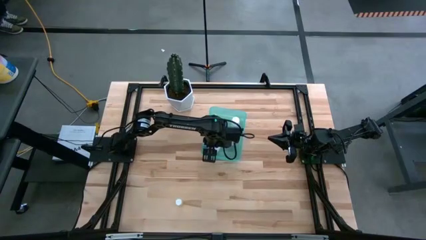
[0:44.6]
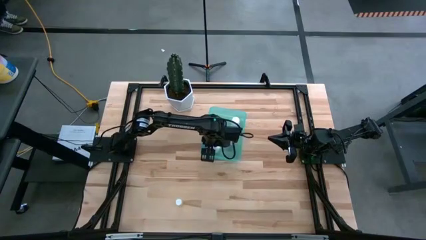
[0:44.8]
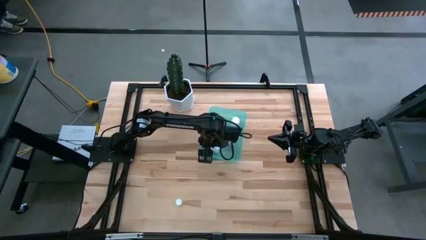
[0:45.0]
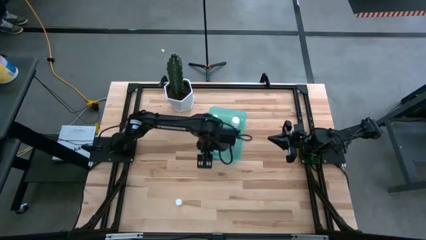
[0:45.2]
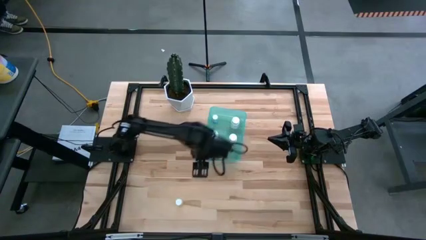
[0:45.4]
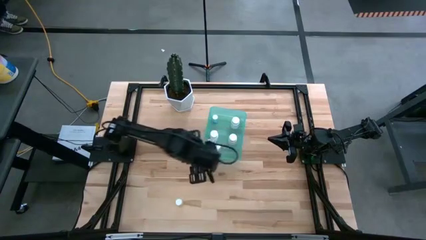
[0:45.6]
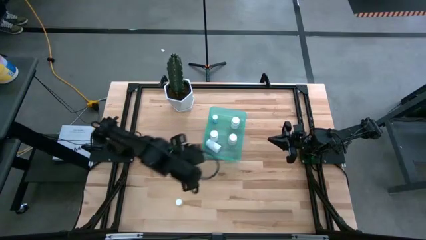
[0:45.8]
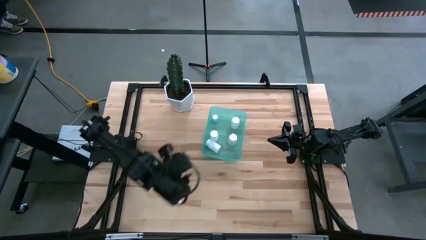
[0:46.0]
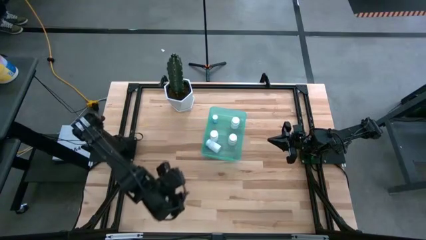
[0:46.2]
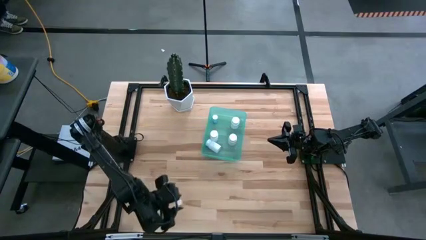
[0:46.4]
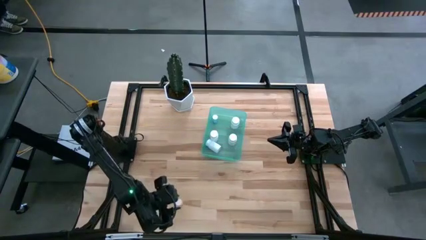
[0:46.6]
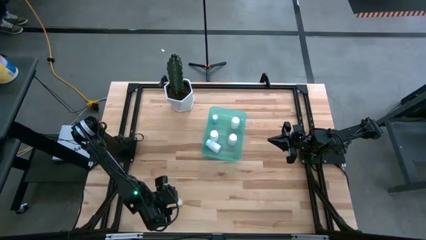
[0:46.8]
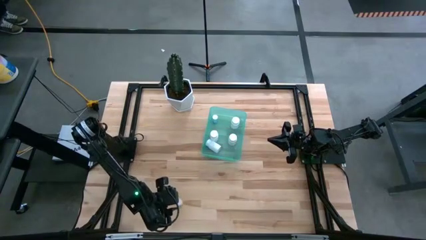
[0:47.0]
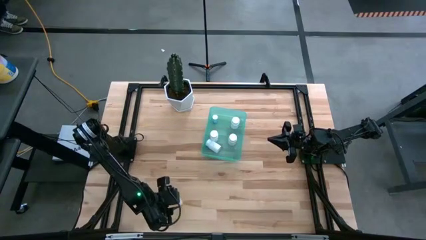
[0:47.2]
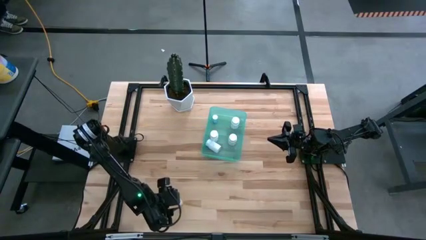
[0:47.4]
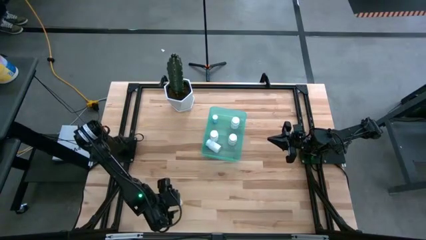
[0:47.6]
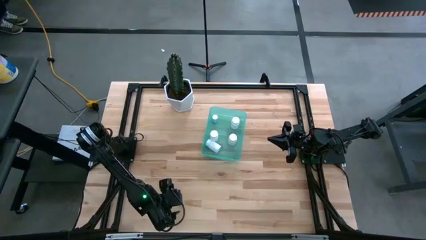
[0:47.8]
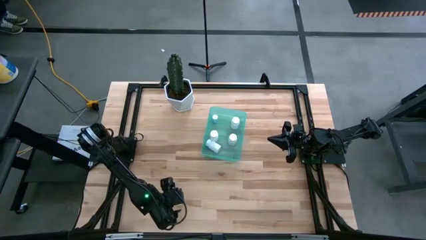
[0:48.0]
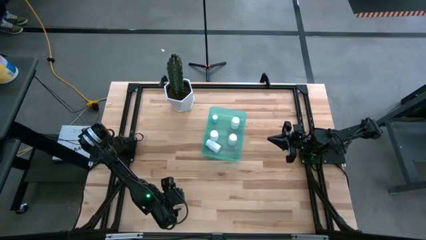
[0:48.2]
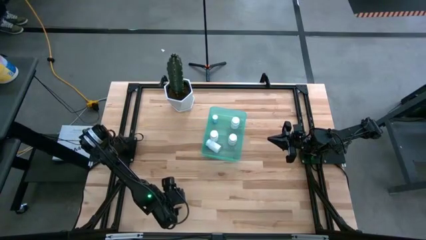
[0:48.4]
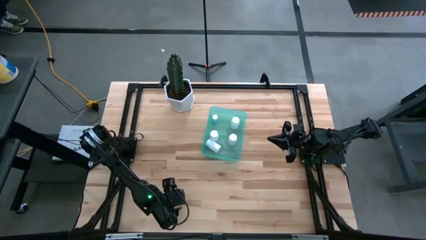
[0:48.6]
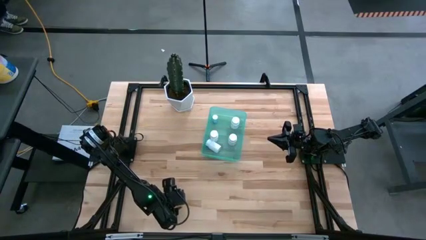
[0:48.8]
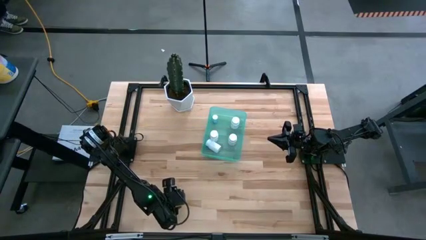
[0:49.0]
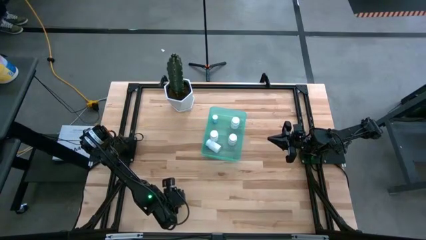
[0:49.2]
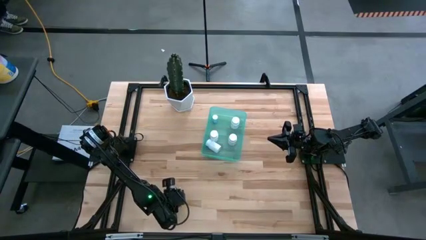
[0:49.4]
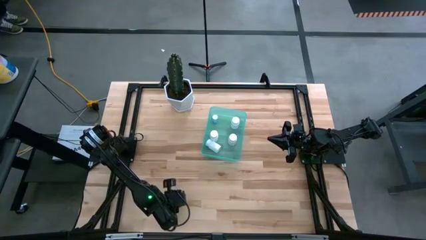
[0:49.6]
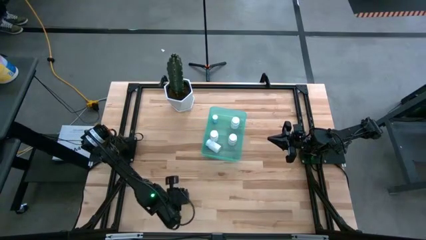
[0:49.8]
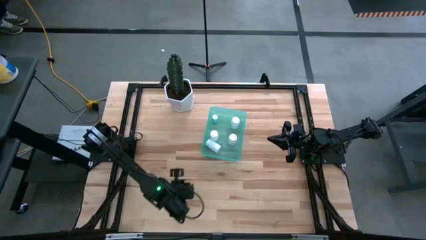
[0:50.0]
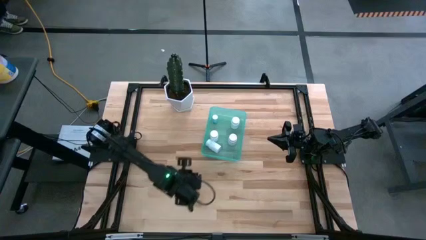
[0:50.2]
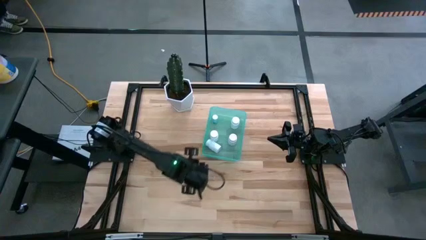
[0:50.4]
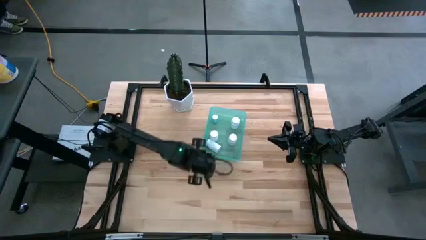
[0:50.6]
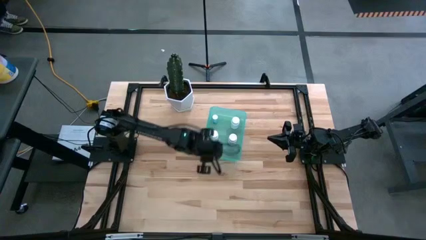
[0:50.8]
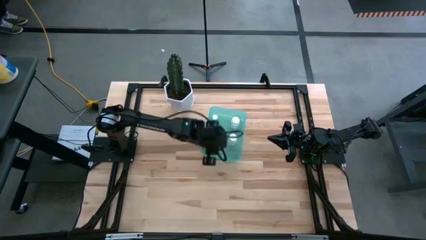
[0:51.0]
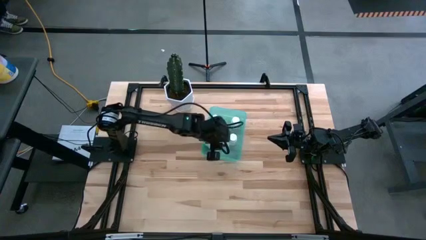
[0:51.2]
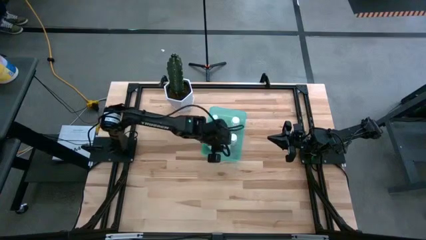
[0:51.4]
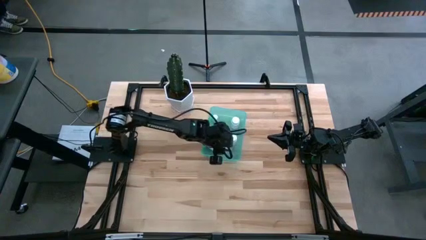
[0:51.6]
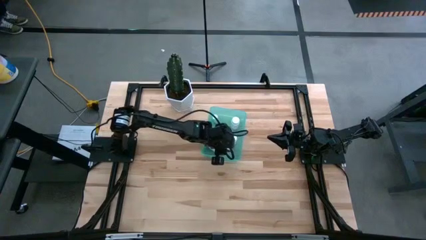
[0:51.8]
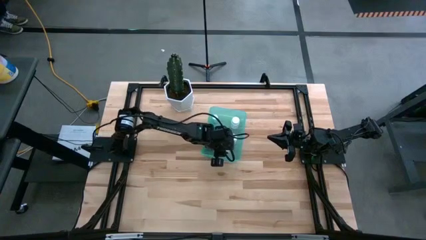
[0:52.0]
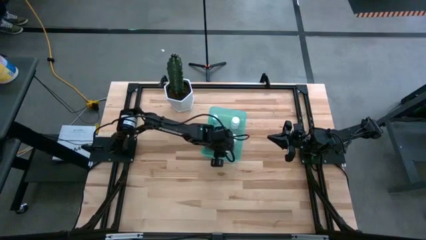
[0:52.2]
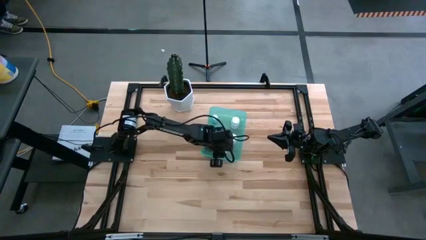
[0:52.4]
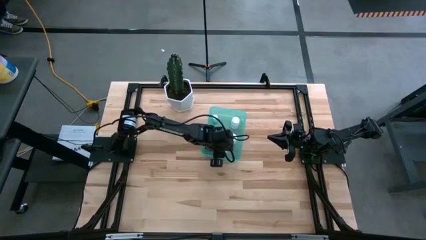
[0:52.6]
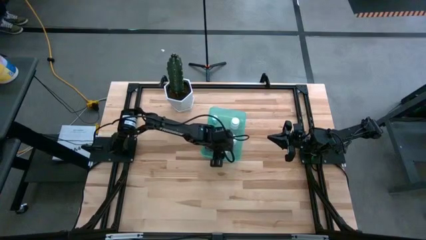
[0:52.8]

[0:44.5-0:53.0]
Task: Pick and place pill bottles into a basket
Put the yellow pill bottle into the blue bin

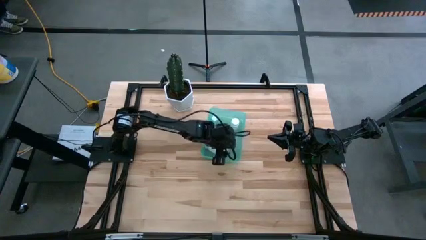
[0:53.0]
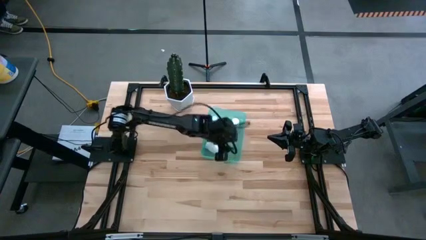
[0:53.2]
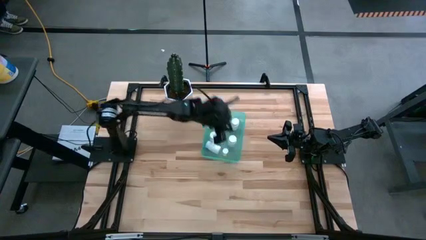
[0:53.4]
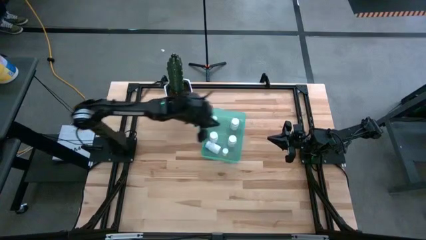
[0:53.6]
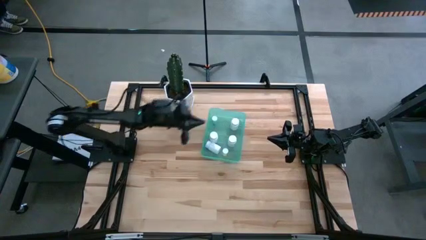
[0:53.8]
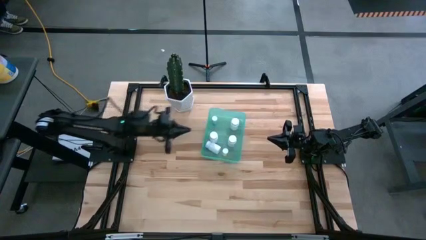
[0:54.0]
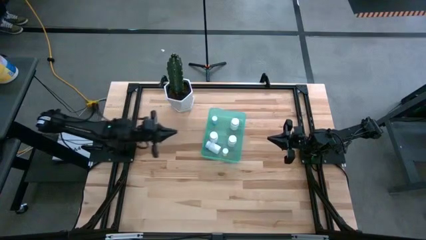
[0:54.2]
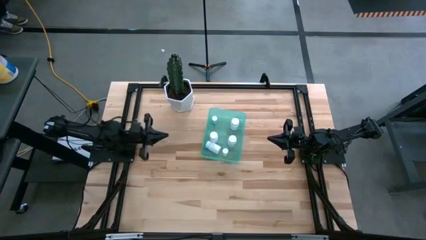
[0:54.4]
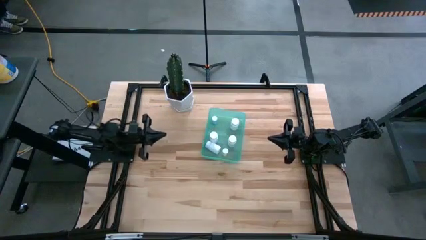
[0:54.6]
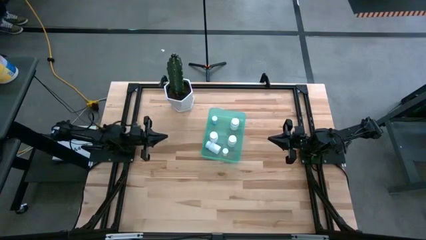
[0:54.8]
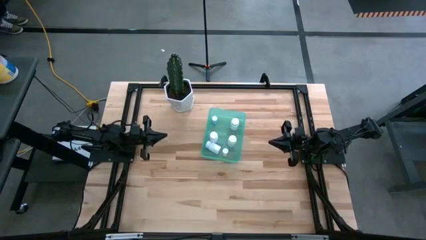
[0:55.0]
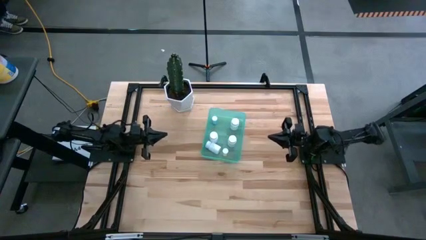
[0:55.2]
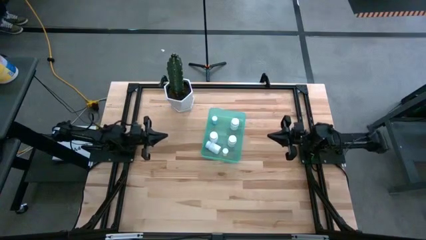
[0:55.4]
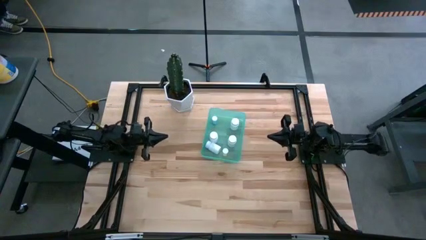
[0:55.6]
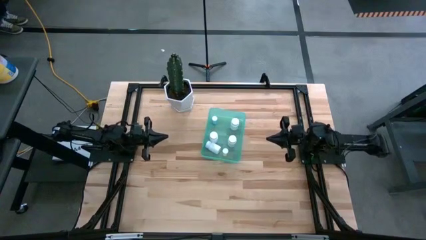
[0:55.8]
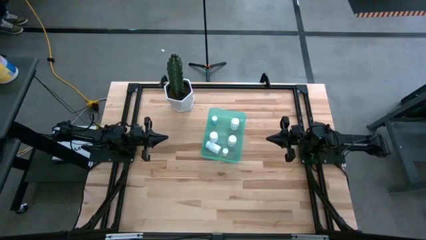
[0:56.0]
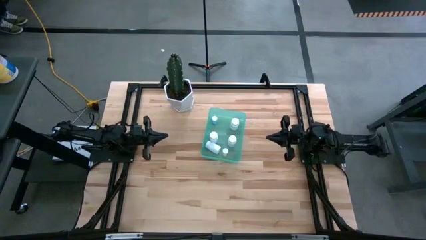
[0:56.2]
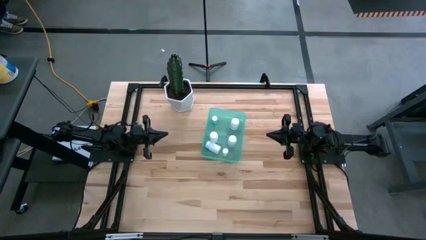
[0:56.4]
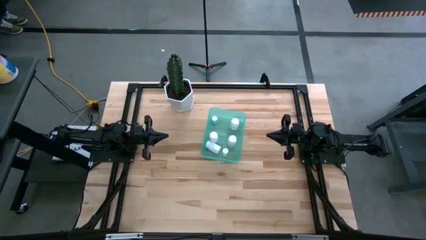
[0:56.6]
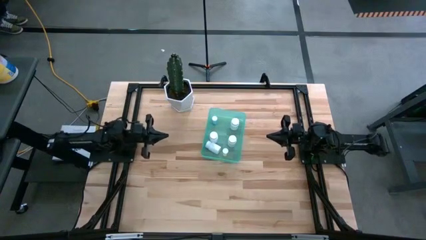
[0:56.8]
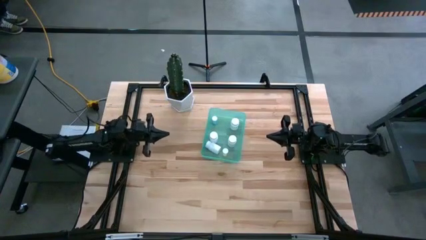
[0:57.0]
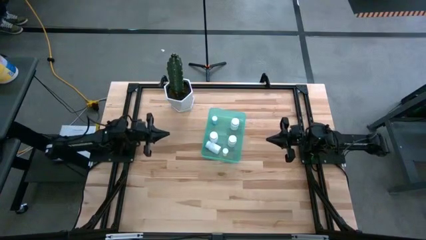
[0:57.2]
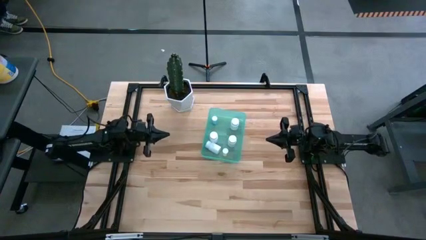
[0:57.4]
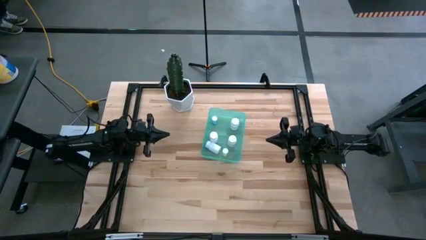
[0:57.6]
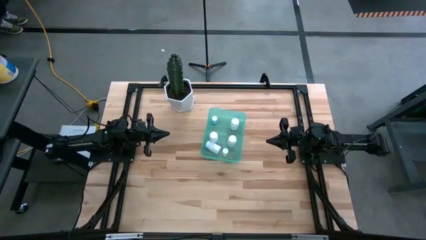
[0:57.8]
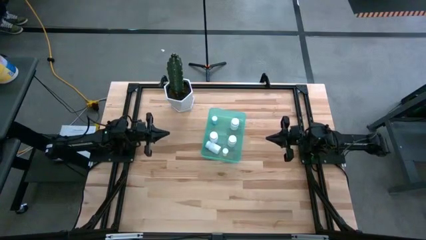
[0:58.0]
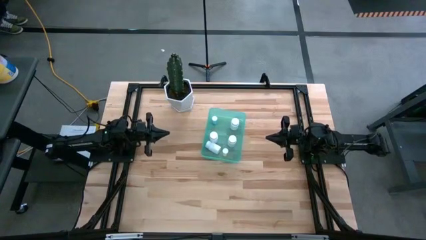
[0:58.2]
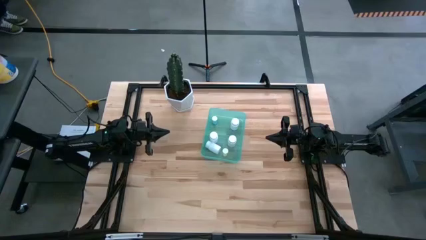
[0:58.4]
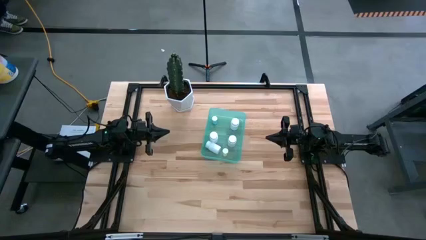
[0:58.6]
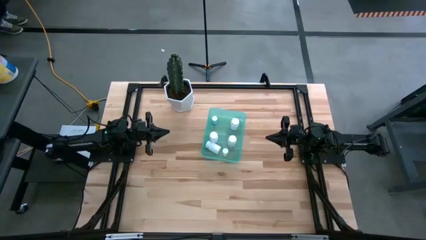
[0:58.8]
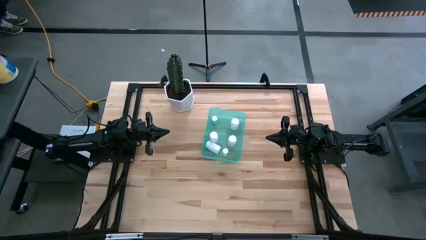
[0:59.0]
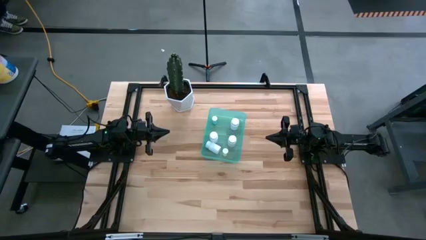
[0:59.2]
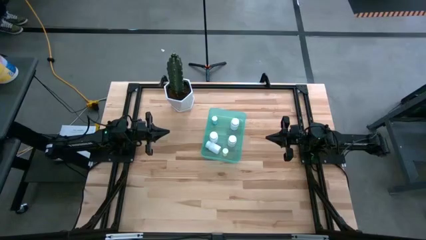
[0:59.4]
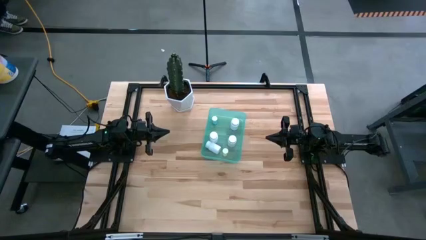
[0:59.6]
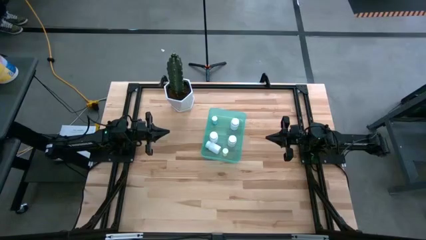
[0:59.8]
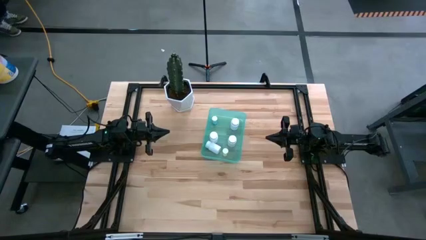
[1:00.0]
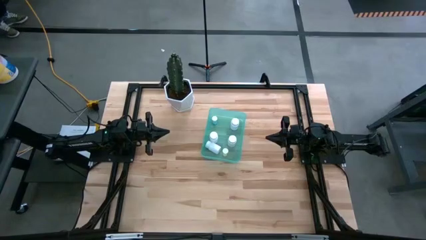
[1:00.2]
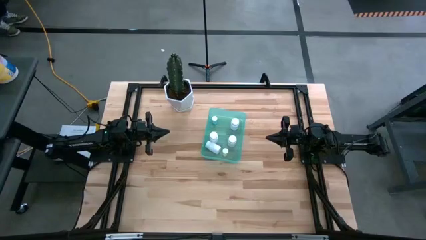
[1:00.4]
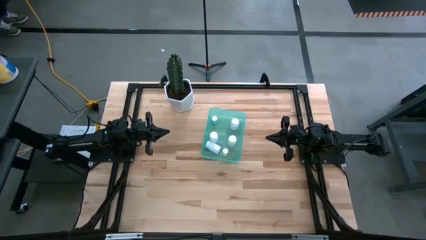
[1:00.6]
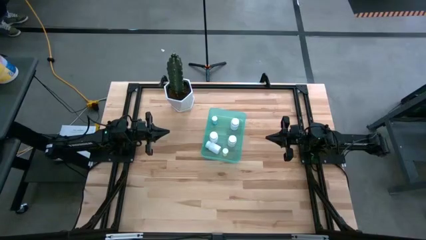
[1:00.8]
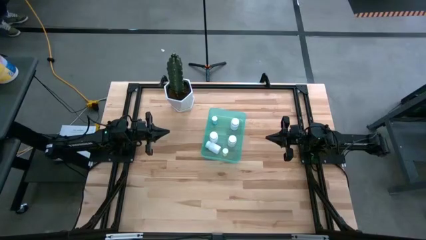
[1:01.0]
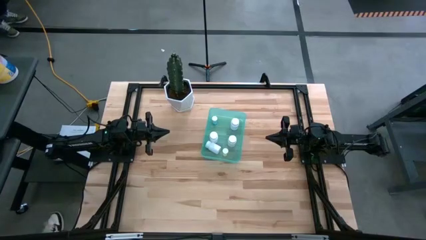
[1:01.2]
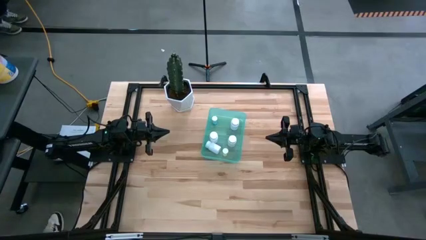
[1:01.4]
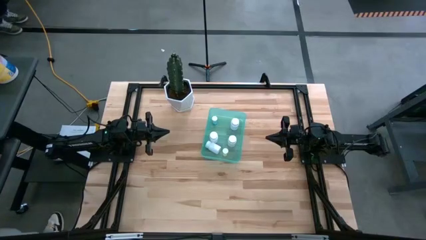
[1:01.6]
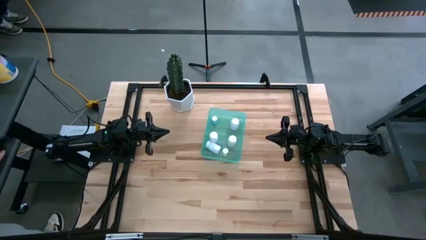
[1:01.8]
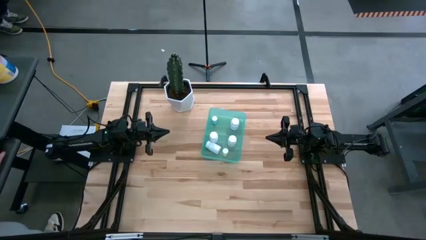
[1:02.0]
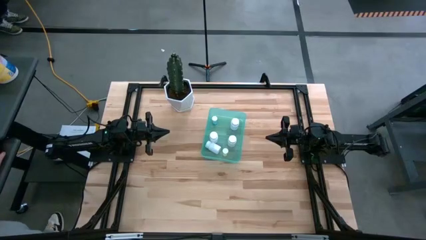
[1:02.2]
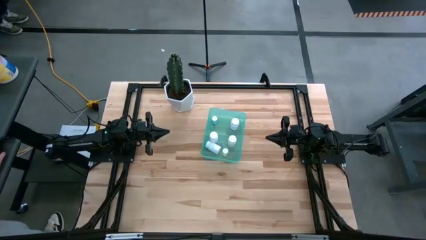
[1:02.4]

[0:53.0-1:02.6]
Return to Home Position
